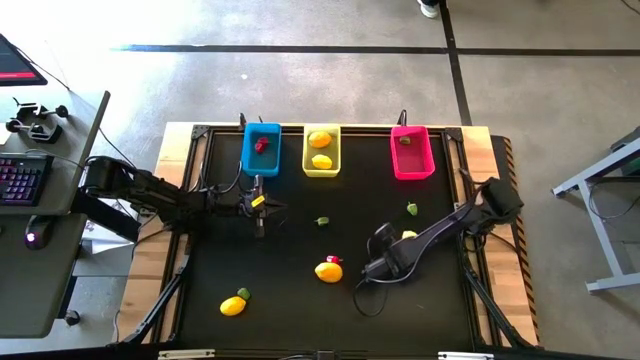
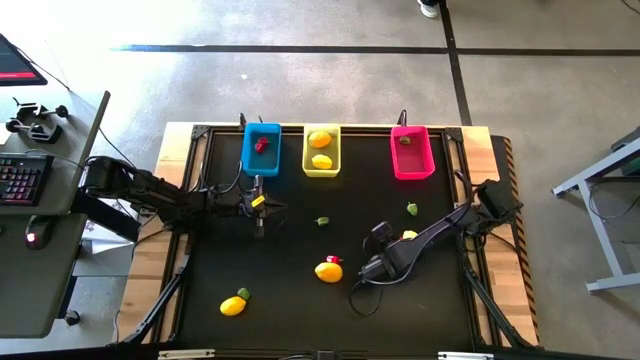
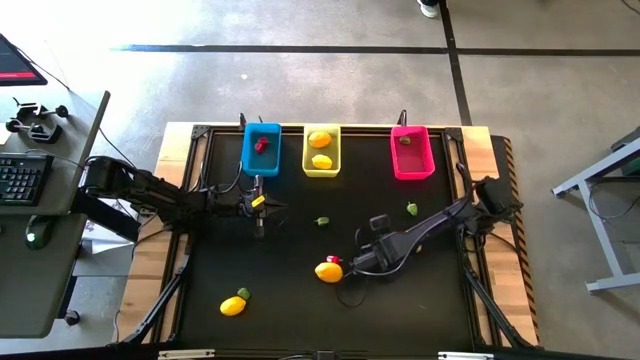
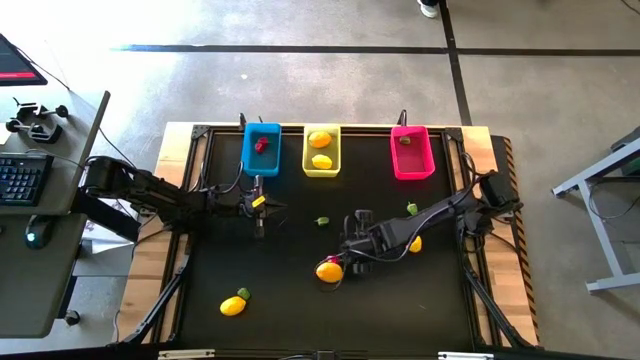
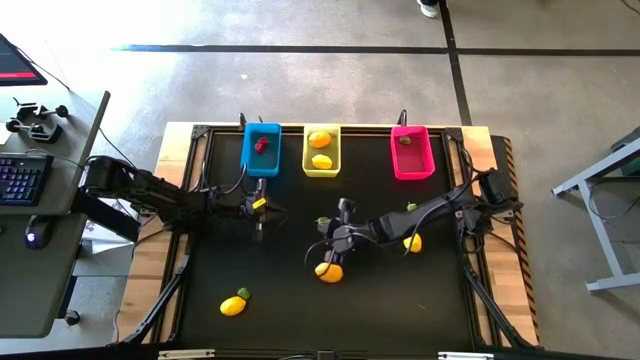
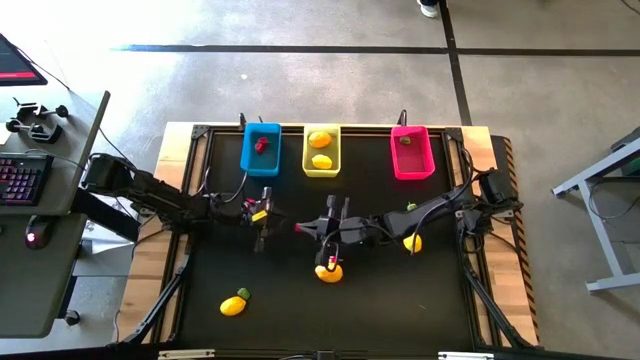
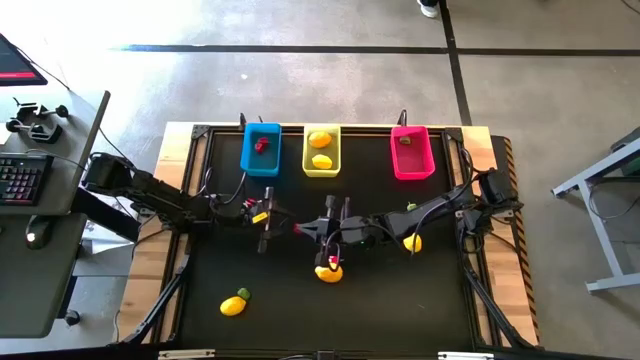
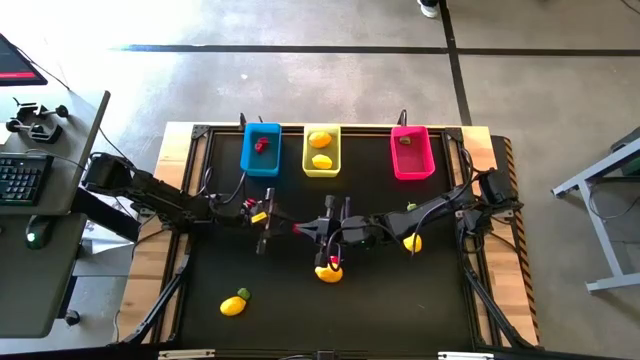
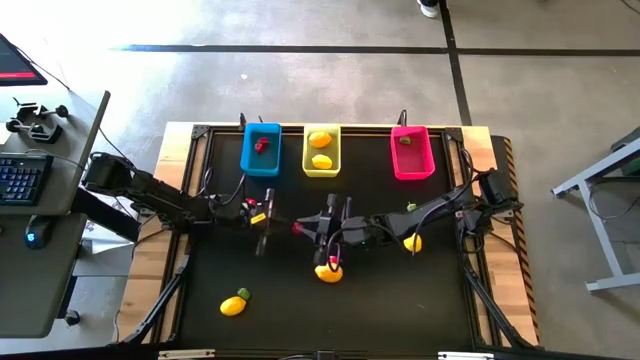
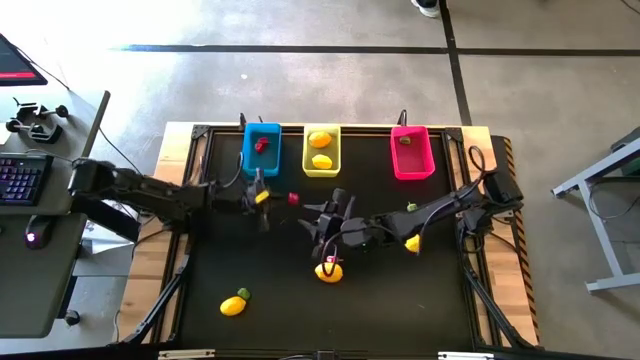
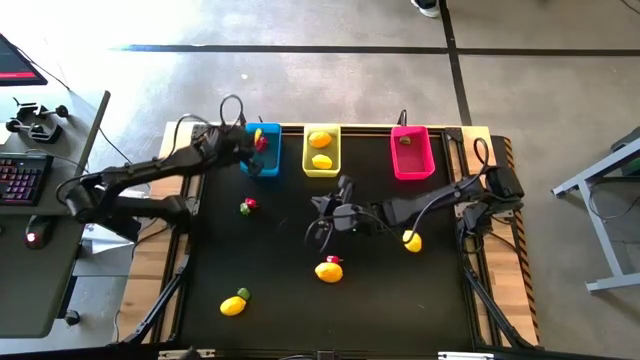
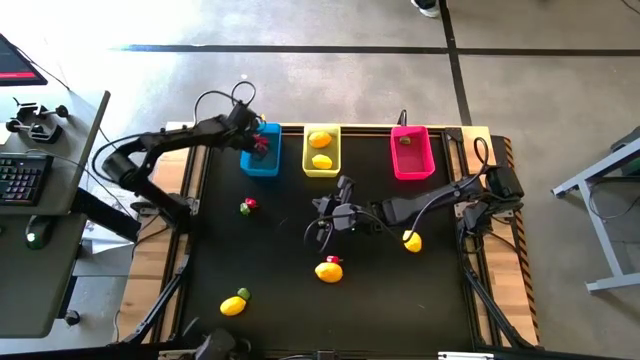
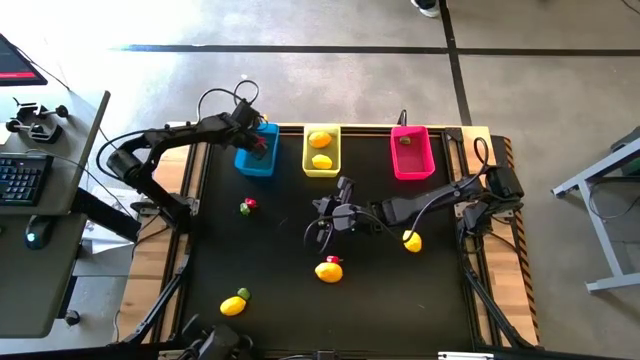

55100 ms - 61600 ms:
Task: Sort produce into baskets
Put the red bell pepper into the blue bin

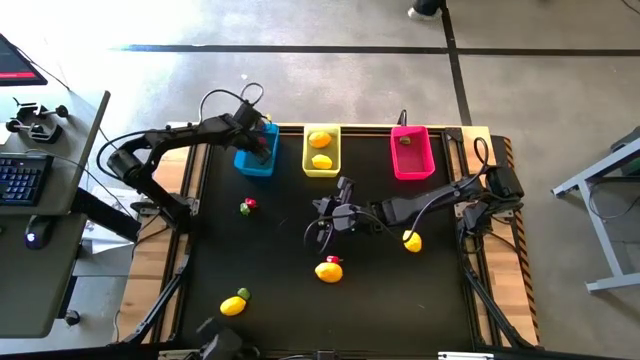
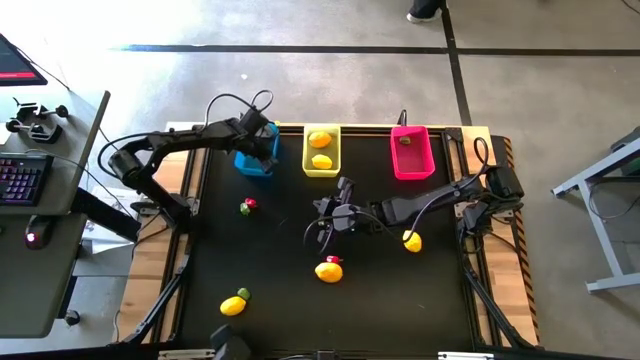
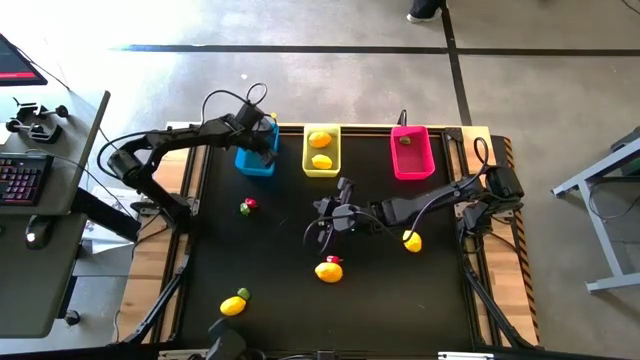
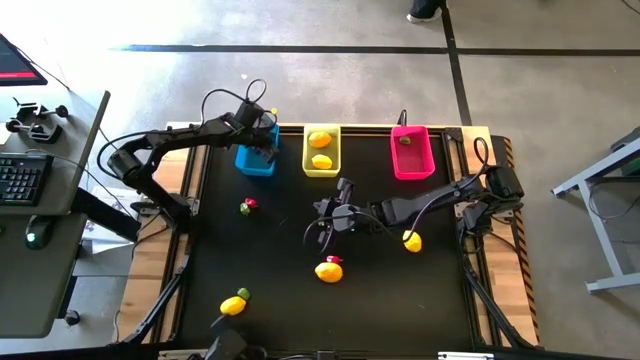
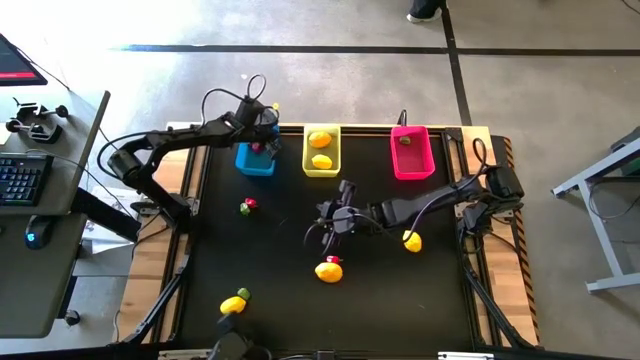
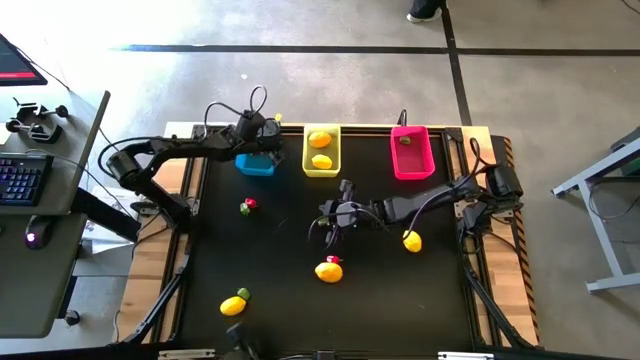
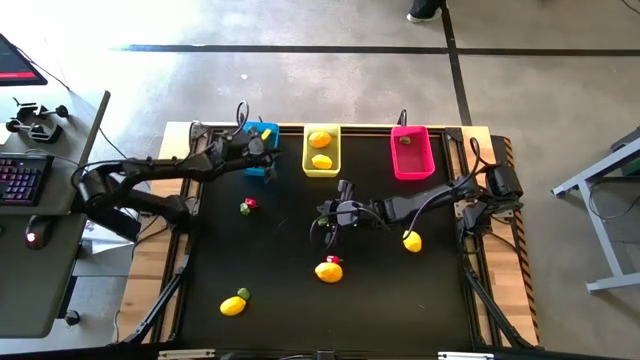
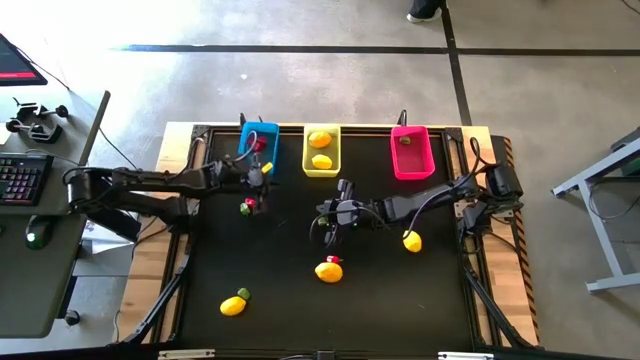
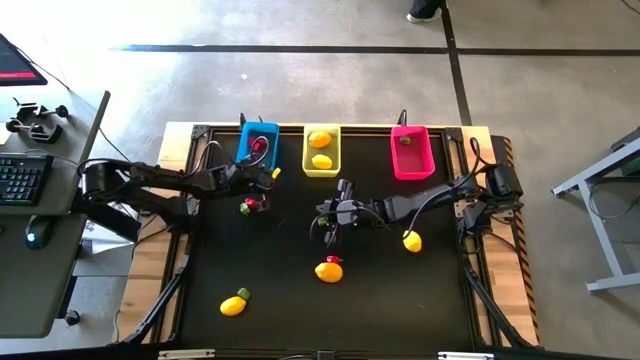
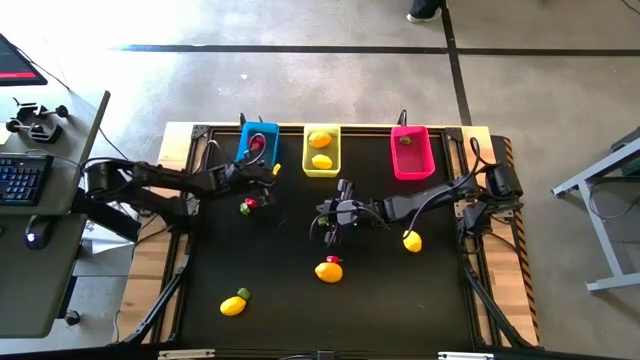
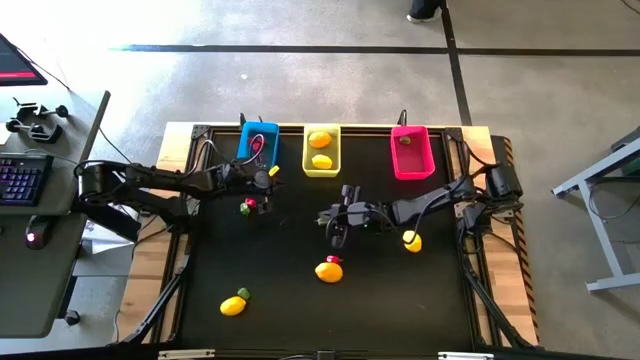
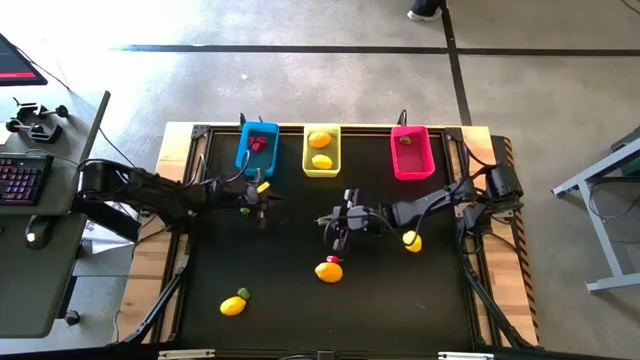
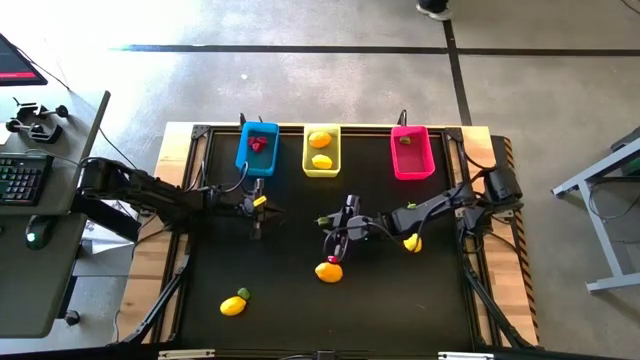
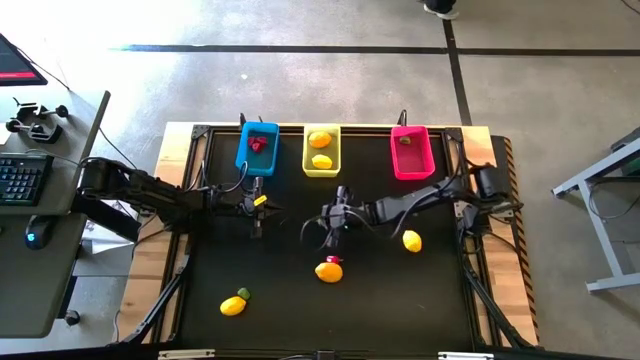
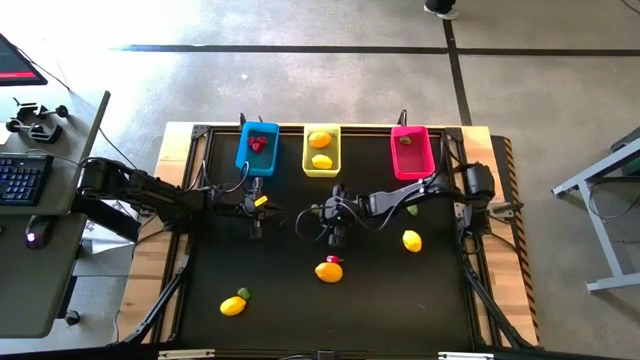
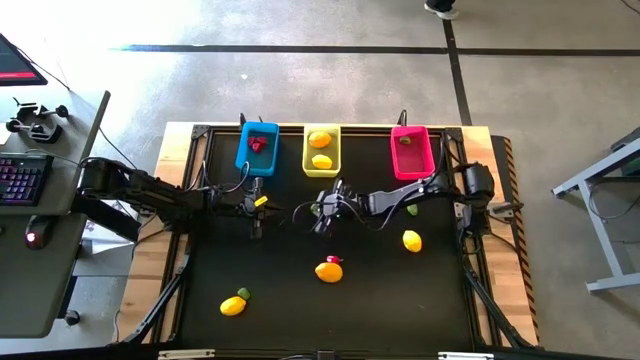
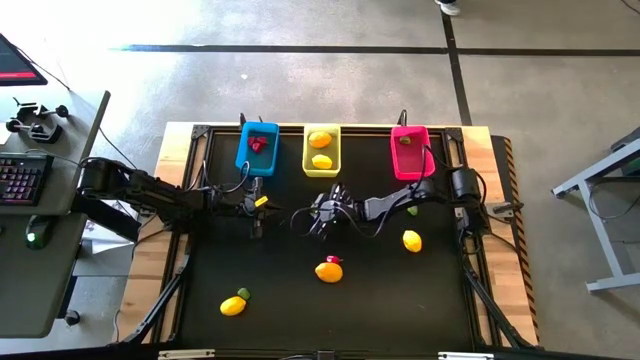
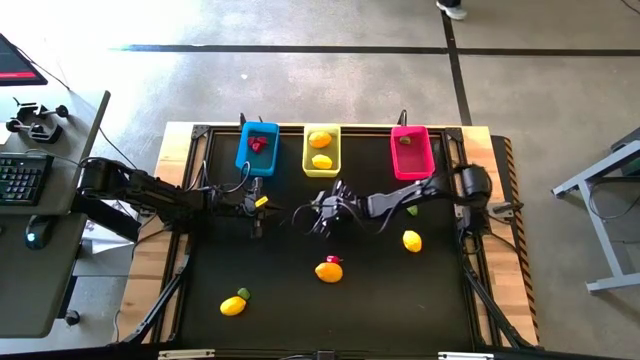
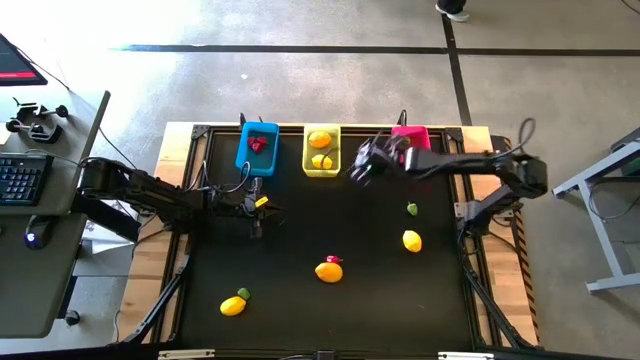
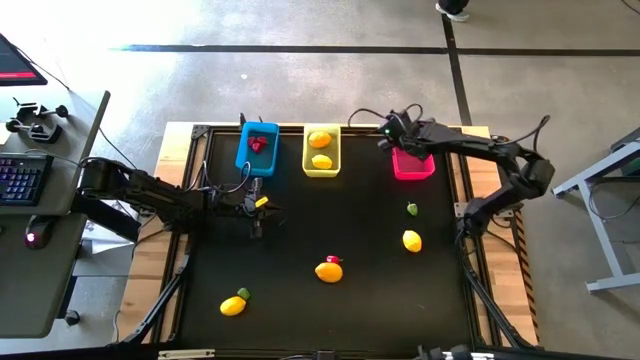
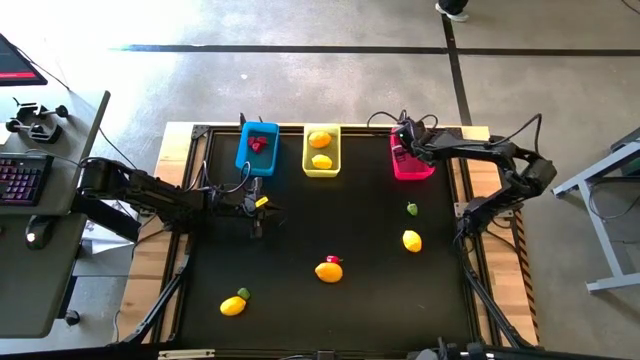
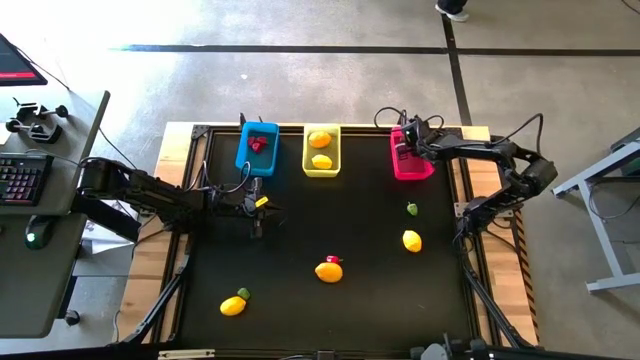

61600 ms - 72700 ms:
Put the green bell pepper into the pink bin

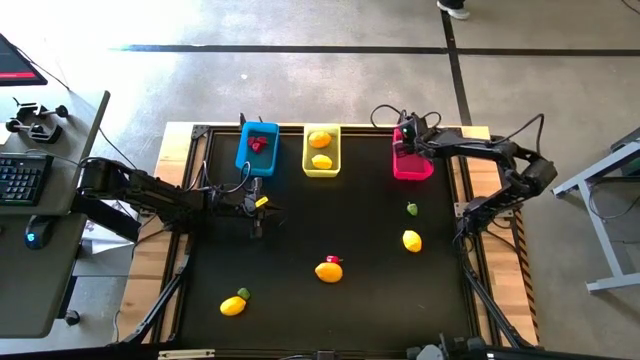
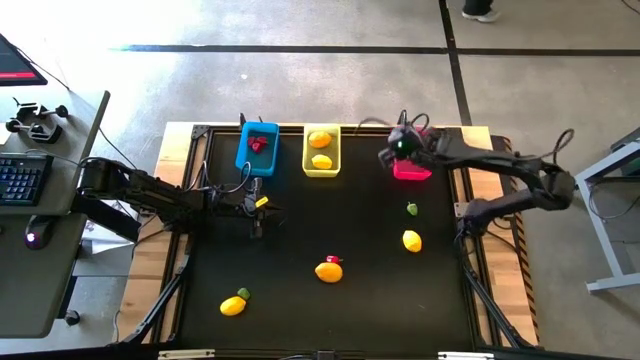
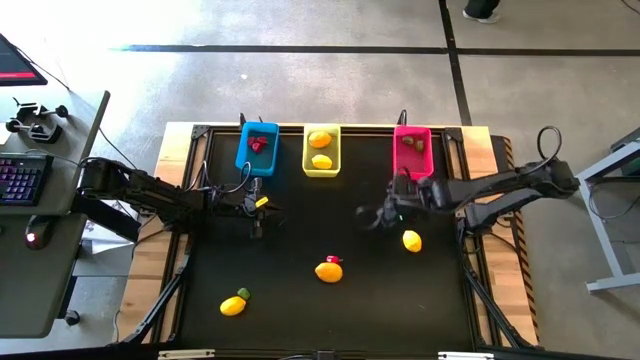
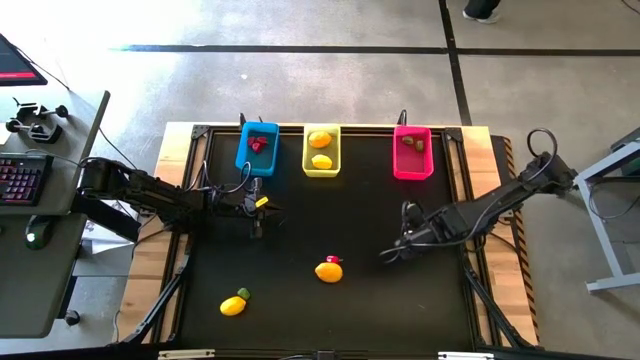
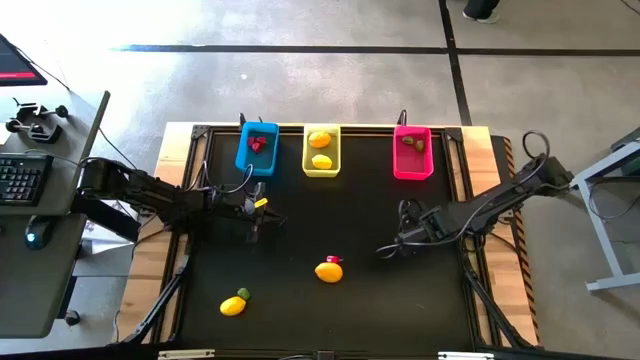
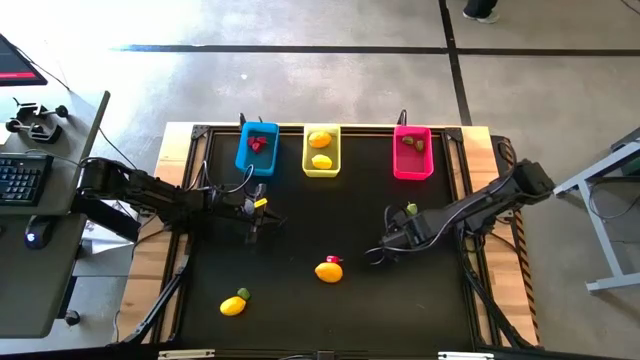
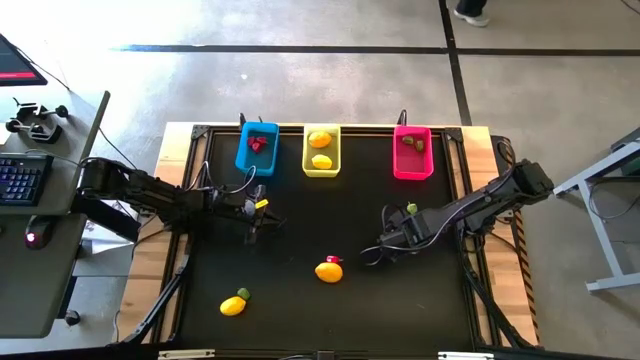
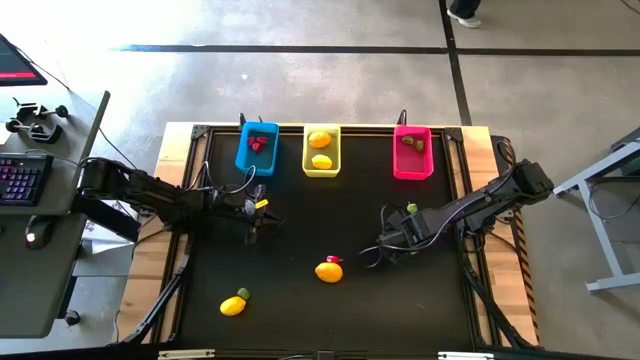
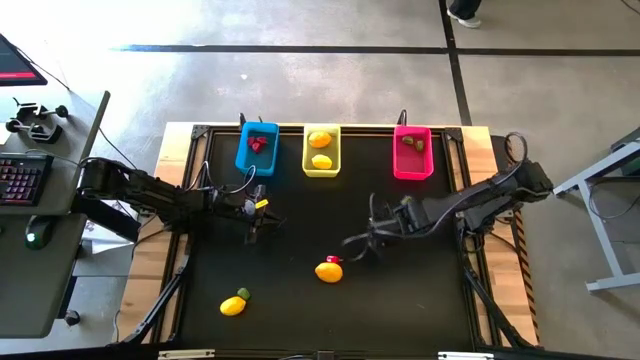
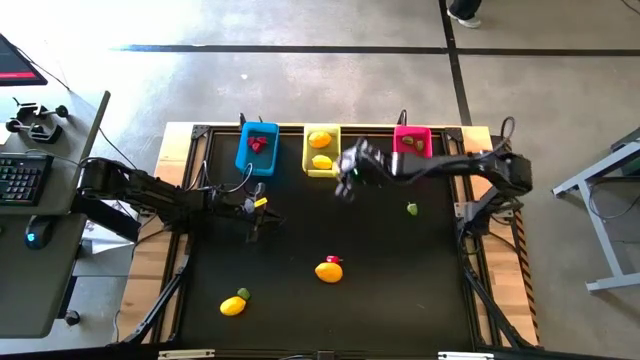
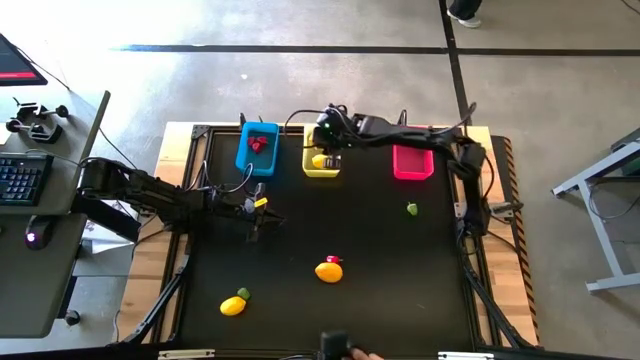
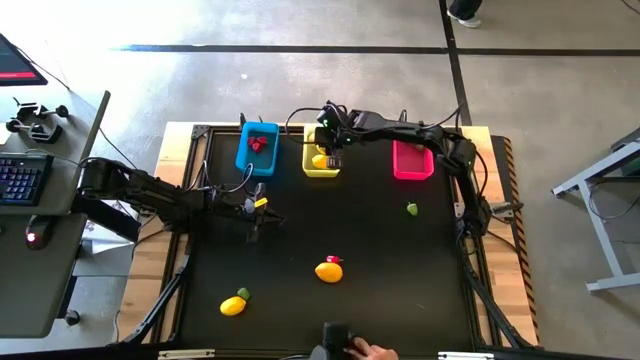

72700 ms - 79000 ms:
Put the yellow lemon into the yellow bin
